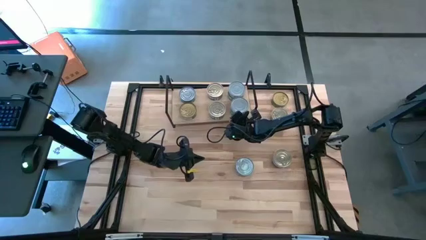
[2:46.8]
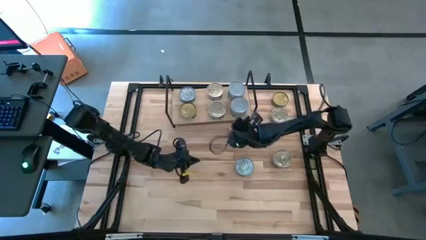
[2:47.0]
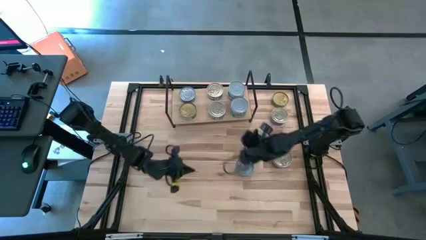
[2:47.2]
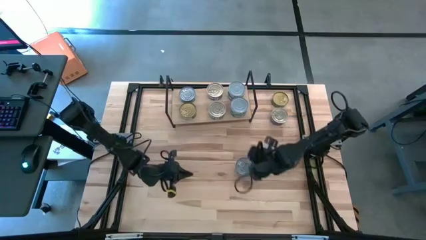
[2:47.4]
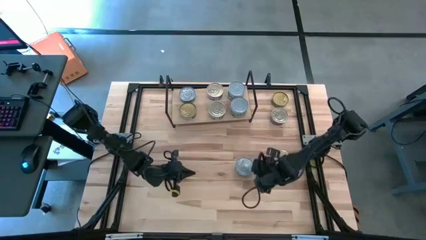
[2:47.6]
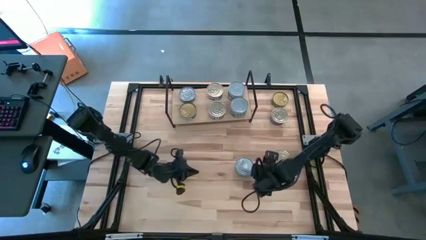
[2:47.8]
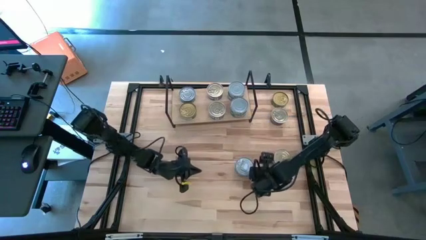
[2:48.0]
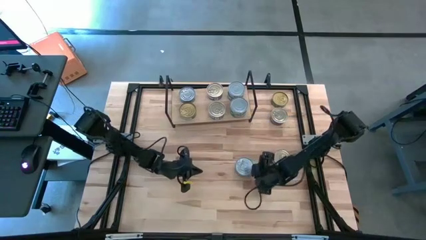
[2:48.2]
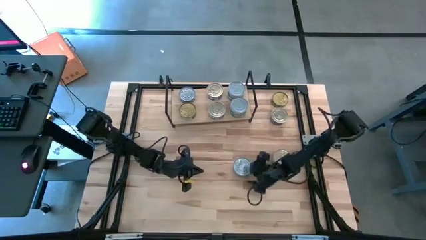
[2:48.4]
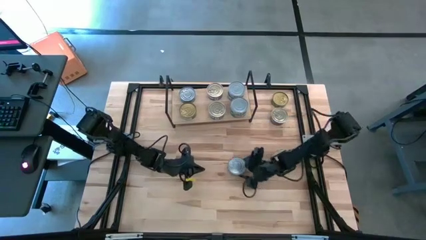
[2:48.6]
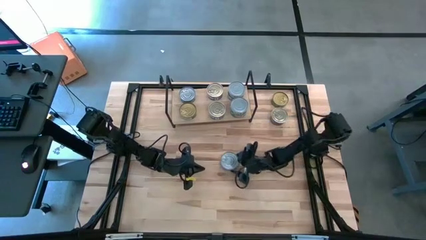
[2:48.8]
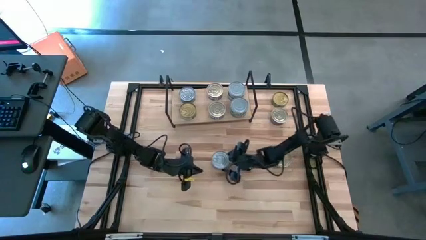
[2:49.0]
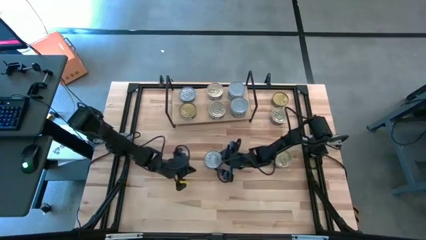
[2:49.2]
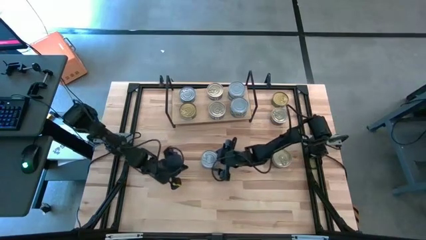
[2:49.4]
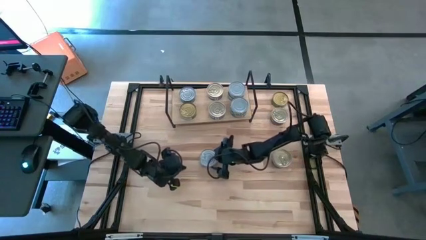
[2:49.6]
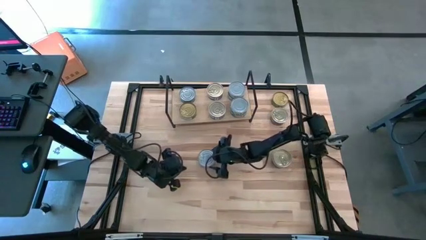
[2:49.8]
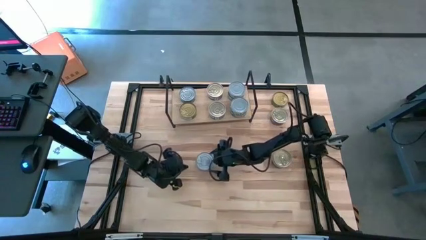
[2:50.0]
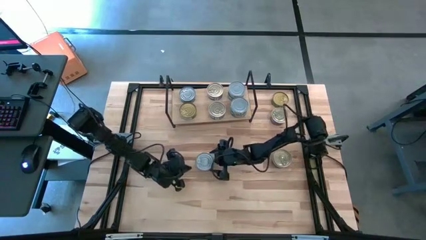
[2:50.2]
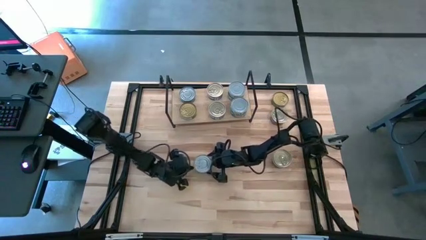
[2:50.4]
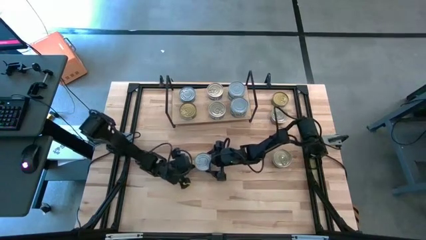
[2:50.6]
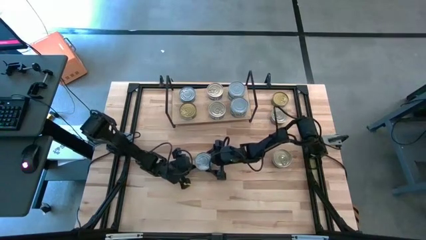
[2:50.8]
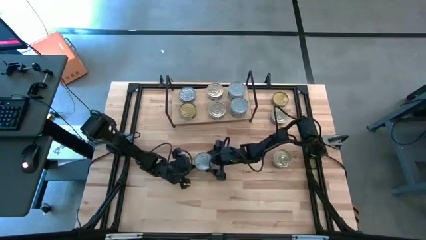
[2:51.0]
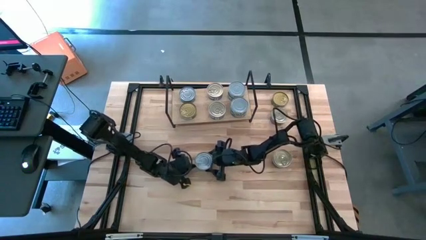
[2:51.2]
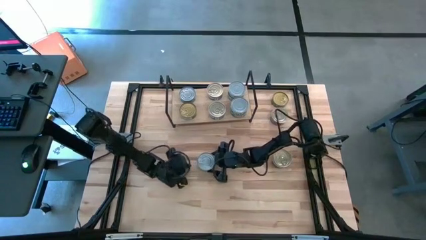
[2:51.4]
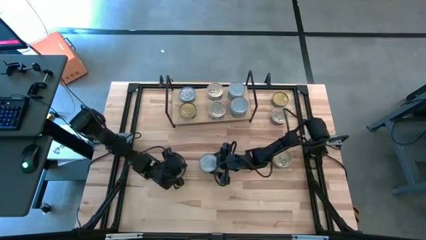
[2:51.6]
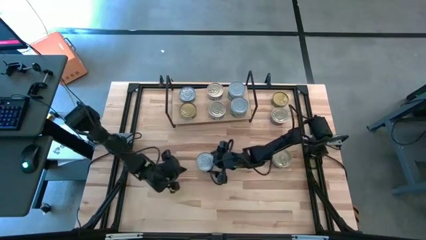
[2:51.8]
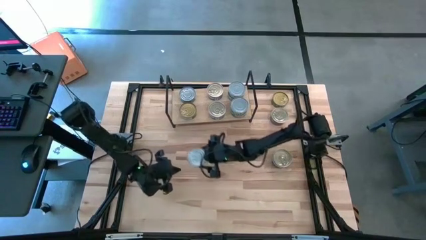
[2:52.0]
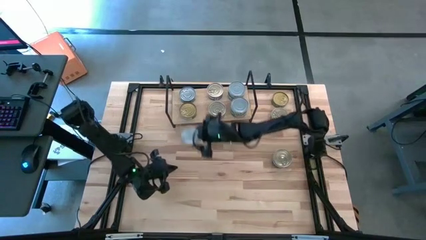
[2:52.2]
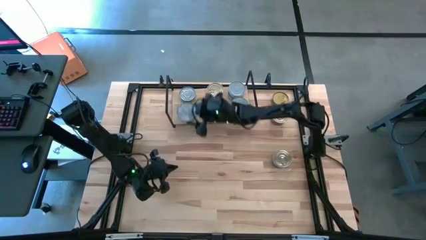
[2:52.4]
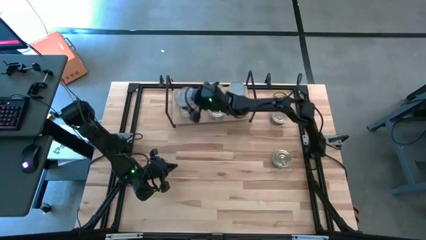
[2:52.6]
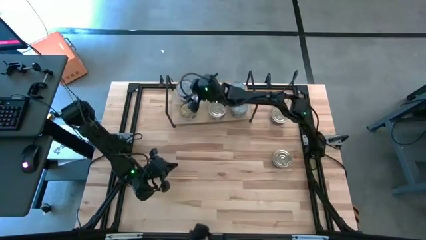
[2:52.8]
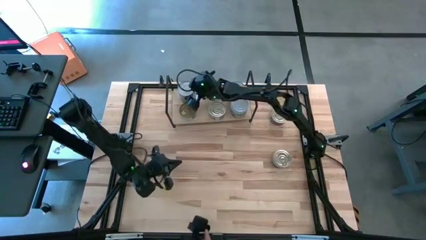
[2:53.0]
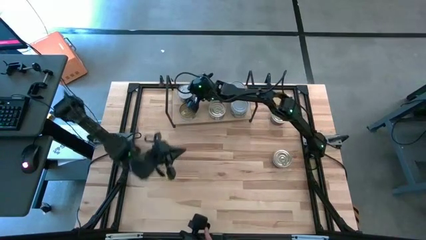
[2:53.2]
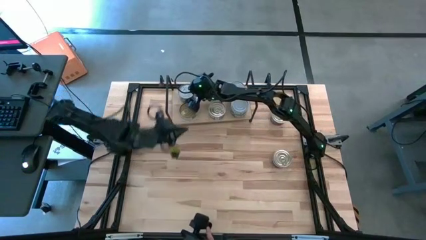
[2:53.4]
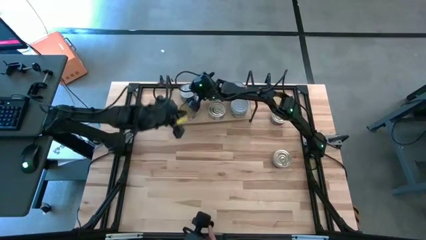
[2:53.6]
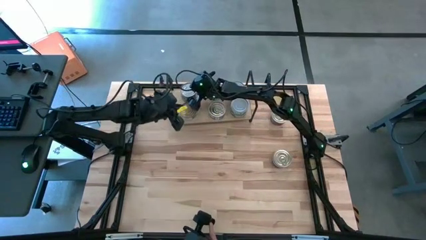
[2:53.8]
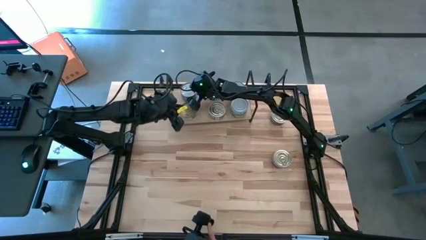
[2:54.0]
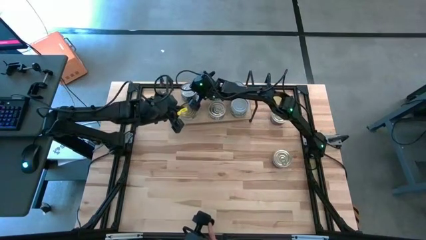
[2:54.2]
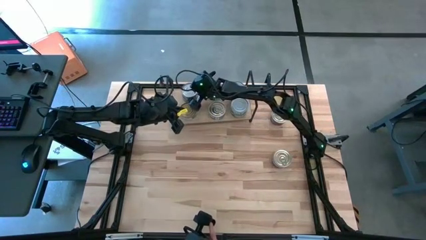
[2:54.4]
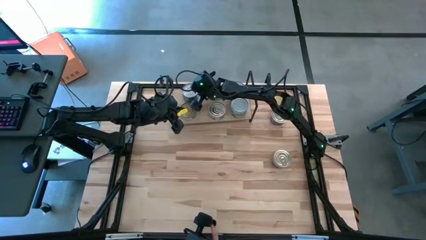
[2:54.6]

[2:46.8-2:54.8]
Task: Stack canned seafood by type on shelf
Stack the green tuna can on top of the green tuna can on the shelf

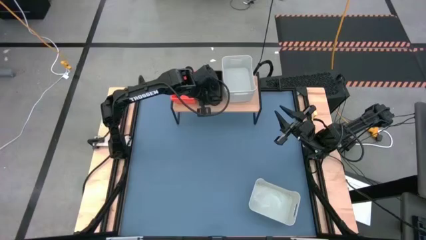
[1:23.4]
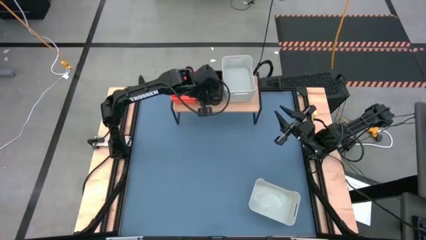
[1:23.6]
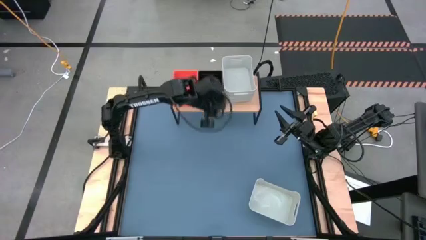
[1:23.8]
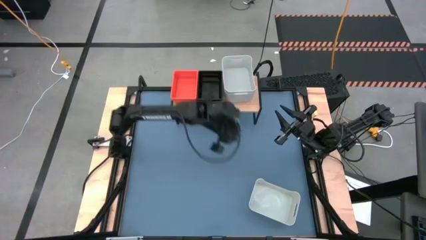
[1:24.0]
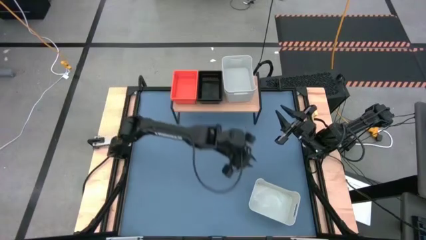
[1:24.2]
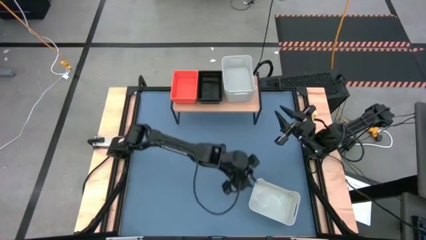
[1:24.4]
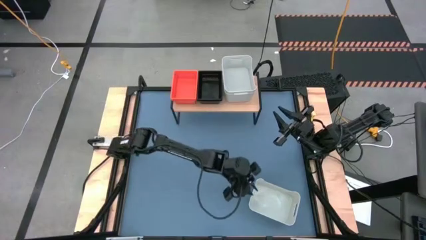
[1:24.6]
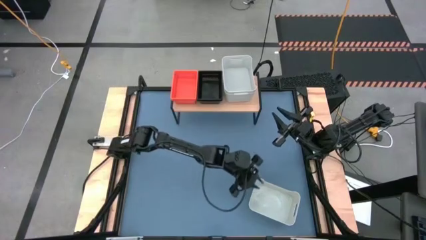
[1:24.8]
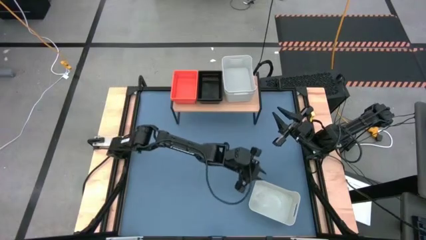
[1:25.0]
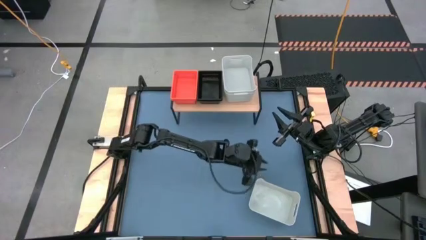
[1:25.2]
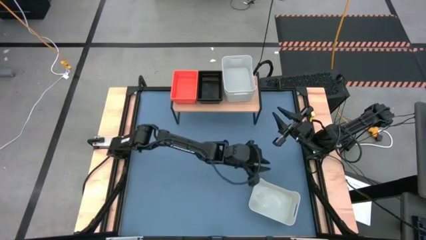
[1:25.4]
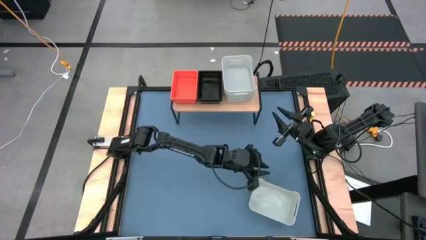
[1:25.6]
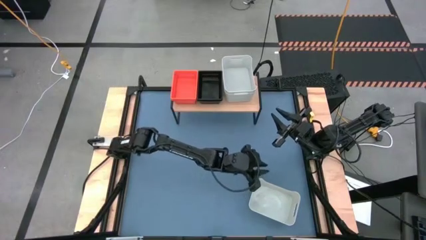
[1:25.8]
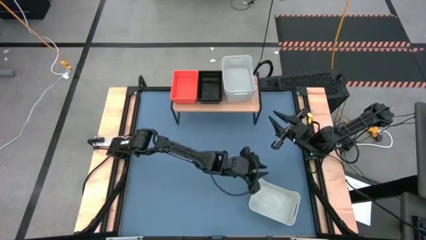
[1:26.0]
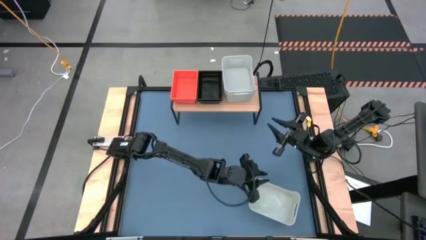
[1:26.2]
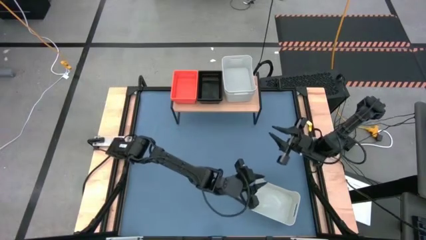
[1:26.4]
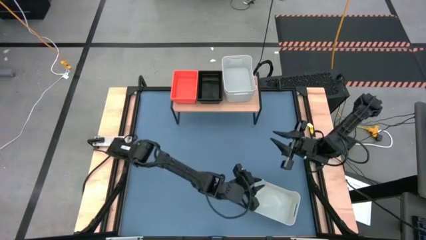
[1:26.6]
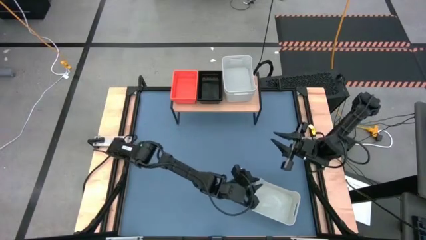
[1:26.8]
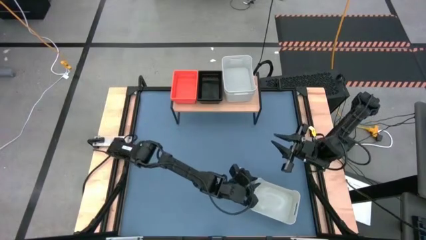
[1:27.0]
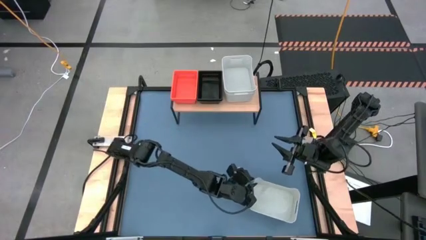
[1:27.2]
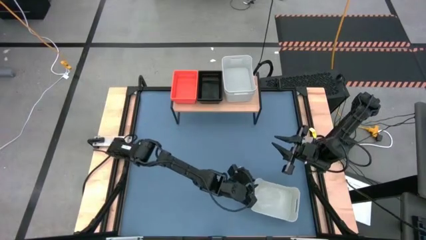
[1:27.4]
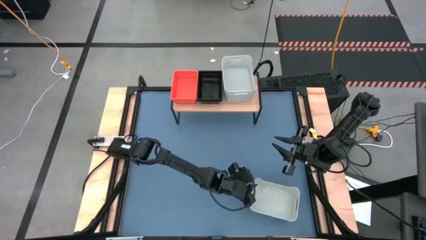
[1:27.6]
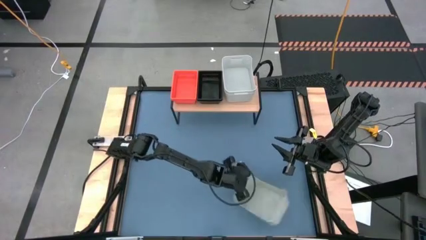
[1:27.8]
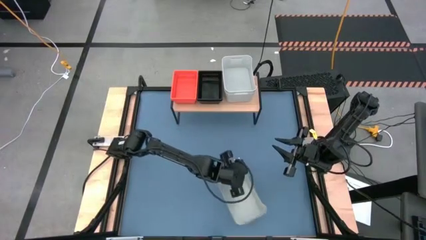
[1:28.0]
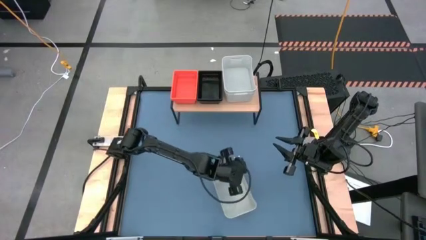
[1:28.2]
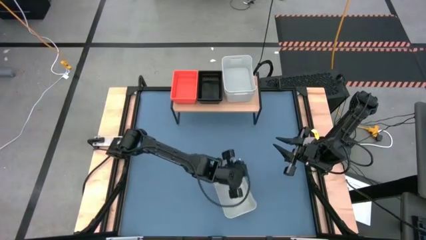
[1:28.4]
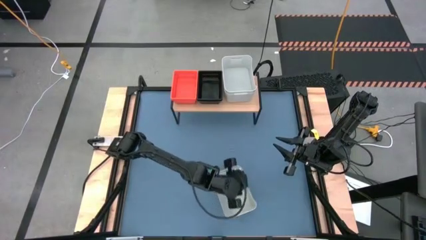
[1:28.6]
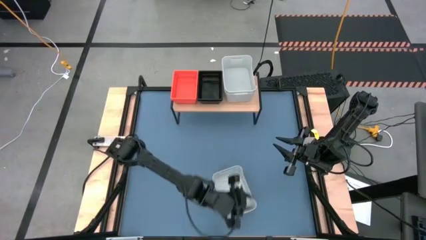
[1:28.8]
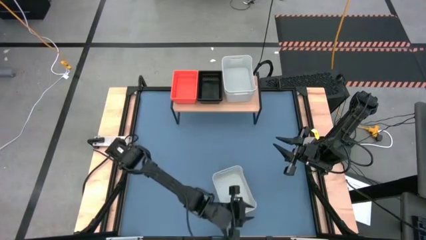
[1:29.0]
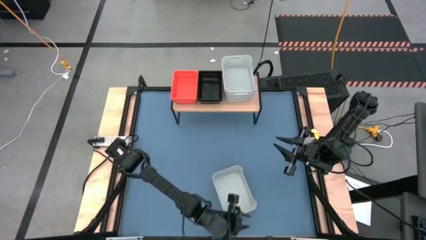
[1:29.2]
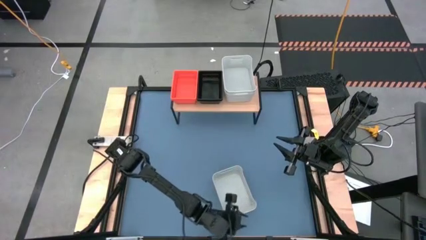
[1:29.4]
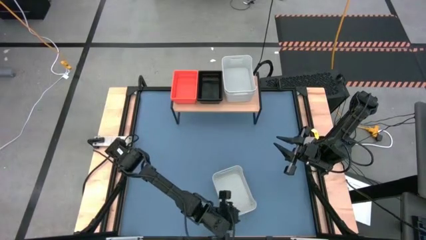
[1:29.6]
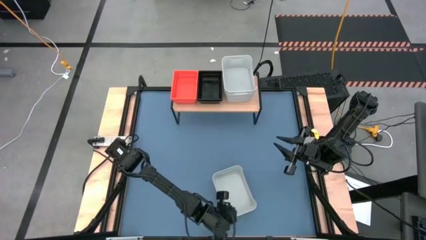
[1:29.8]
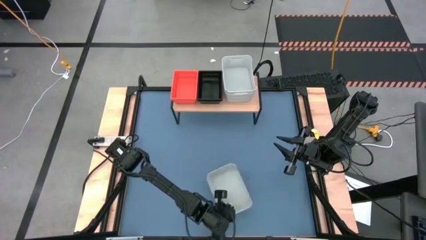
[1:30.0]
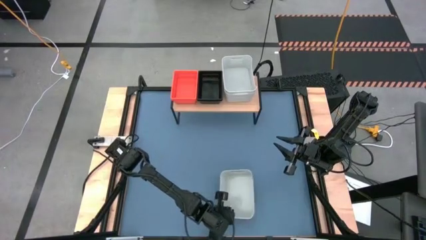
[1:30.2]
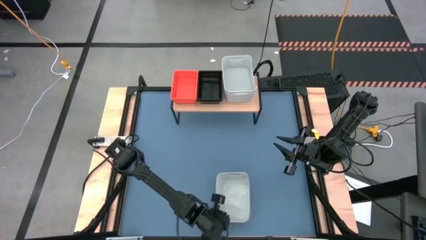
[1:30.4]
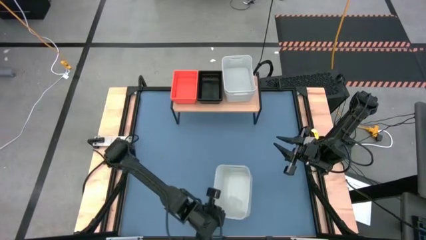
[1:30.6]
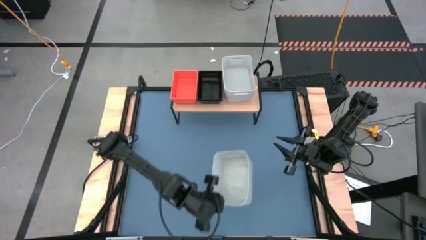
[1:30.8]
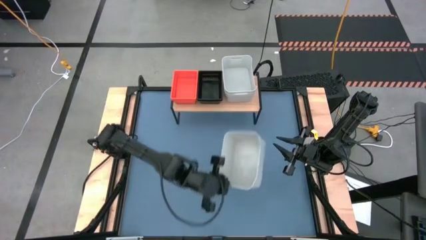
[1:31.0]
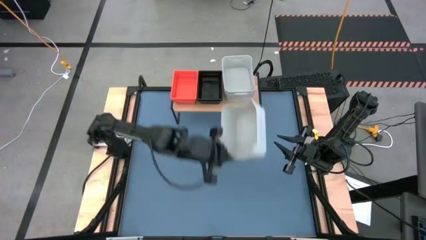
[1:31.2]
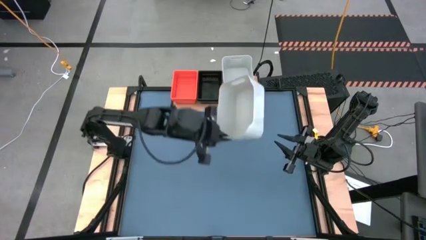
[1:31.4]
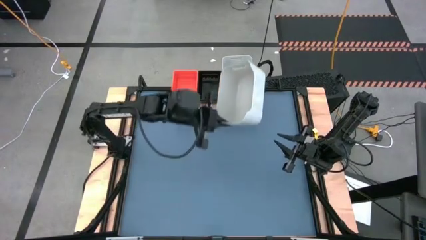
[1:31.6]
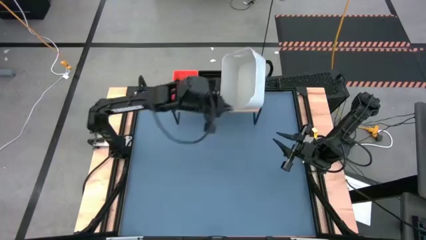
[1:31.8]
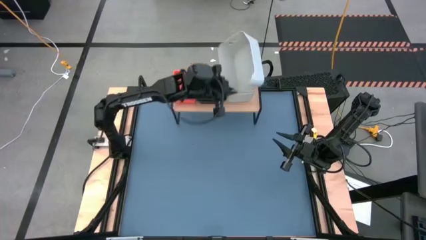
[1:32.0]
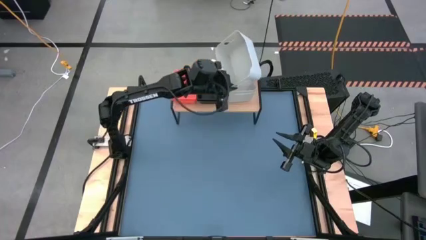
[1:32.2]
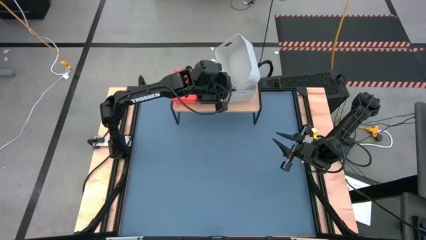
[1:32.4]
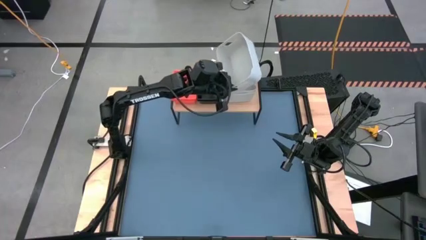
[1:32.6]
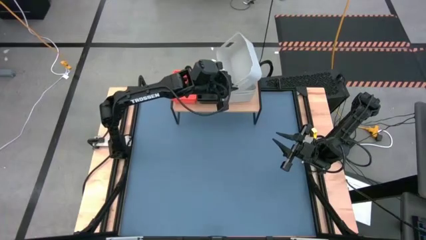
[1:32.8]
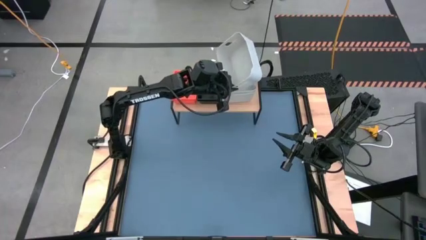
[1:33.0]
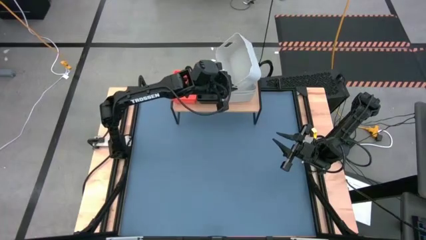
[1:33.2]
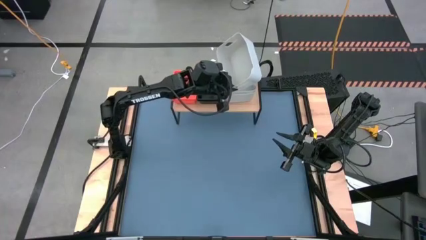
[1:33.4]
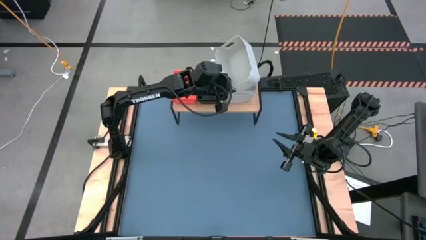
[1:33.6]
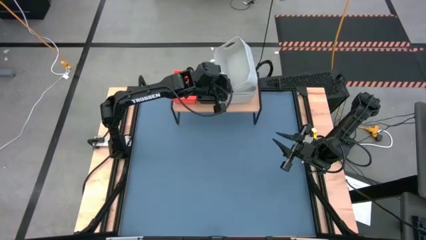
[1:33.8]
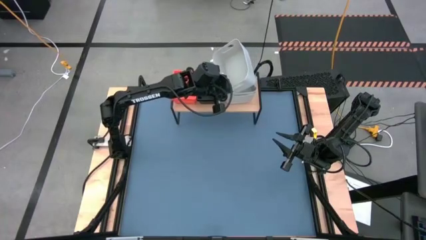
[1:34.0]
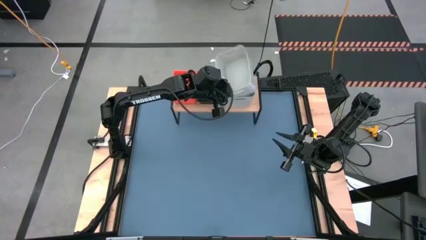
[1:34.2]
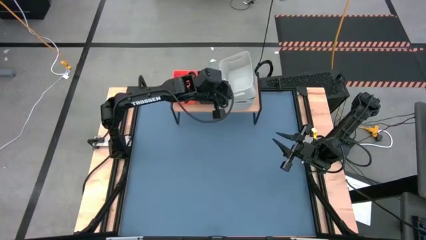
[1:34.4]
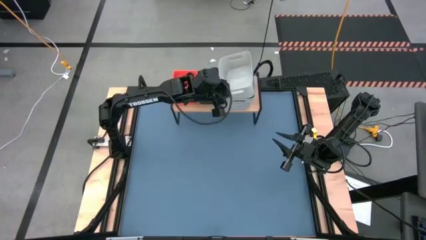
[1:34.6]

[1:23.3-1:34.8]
Task: Stack baskets on shelf by color
Stack the gray bin on top of the other gray bins on the shelf
